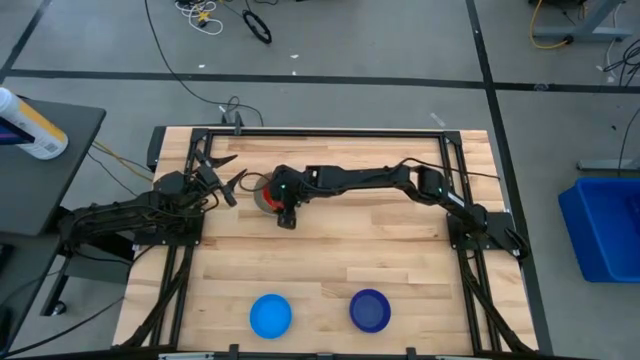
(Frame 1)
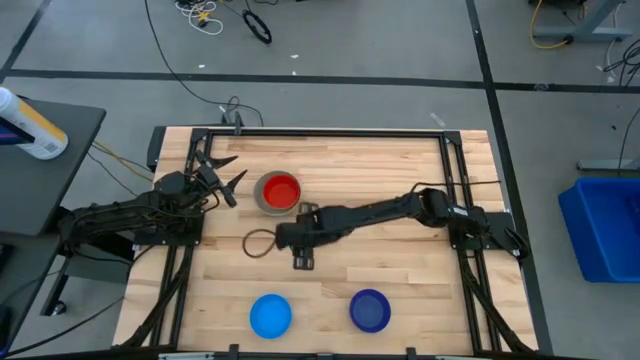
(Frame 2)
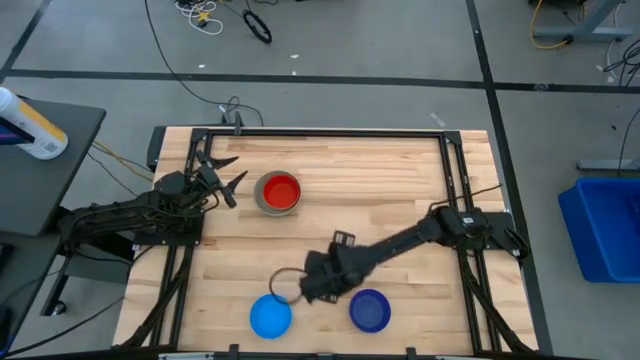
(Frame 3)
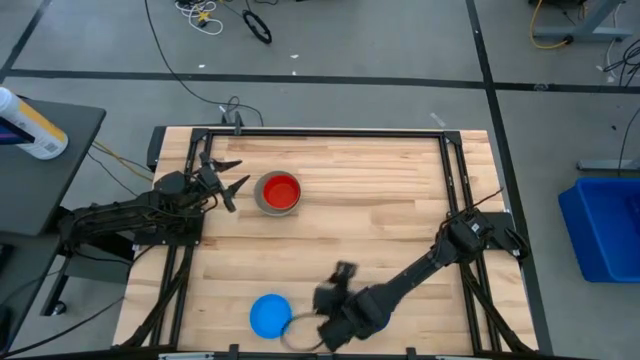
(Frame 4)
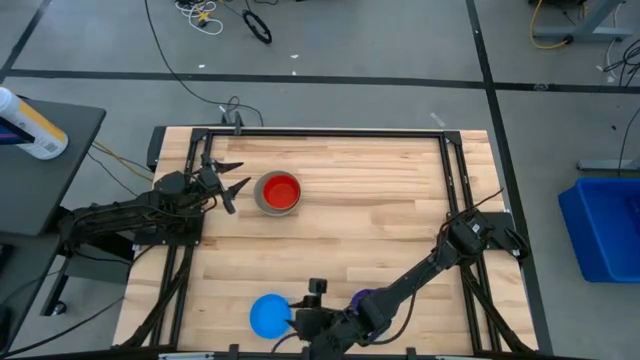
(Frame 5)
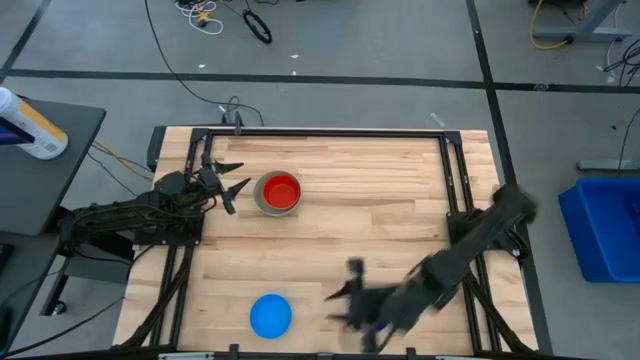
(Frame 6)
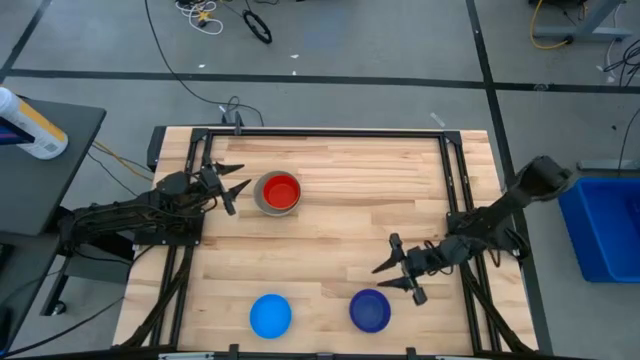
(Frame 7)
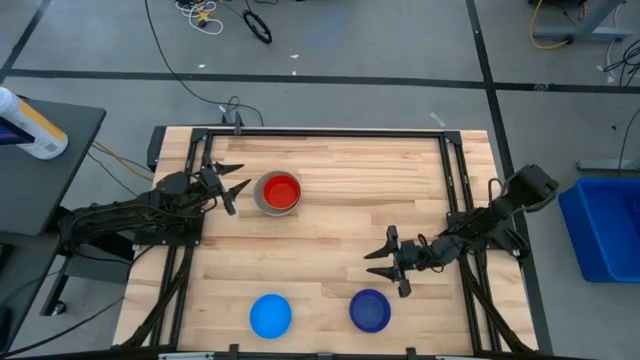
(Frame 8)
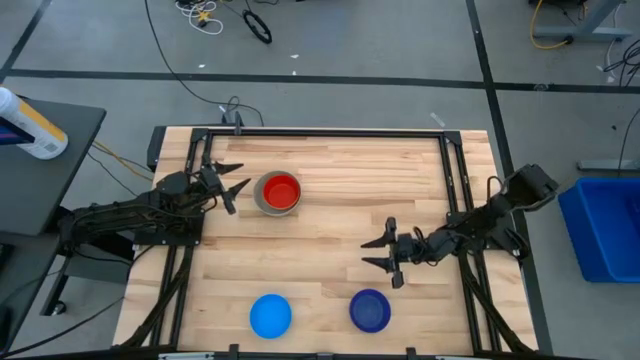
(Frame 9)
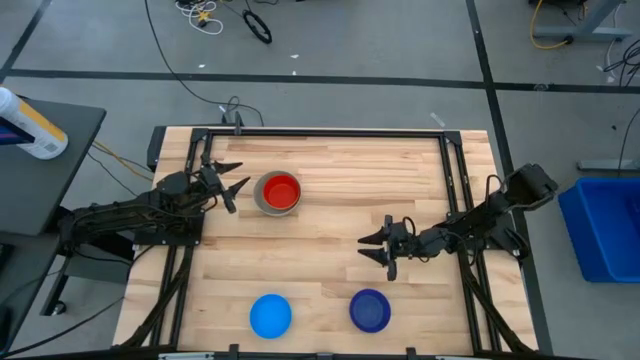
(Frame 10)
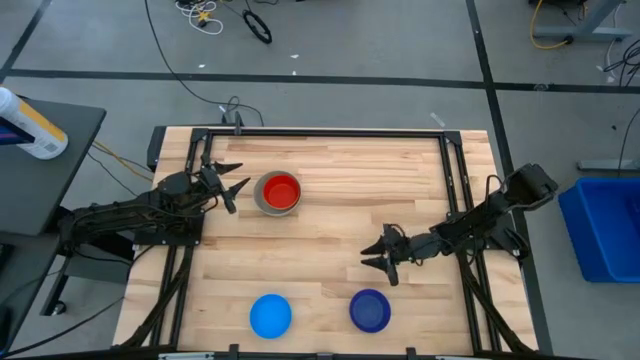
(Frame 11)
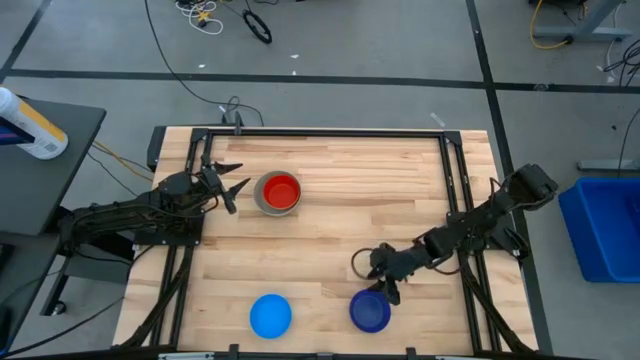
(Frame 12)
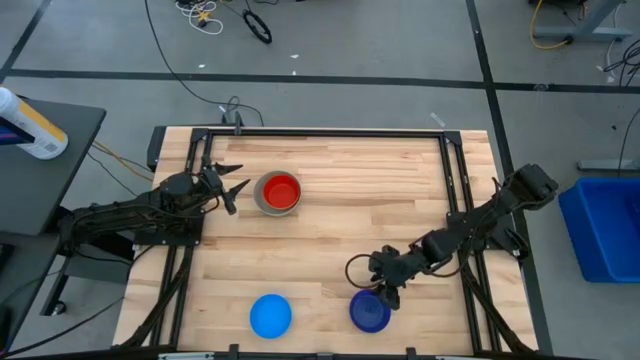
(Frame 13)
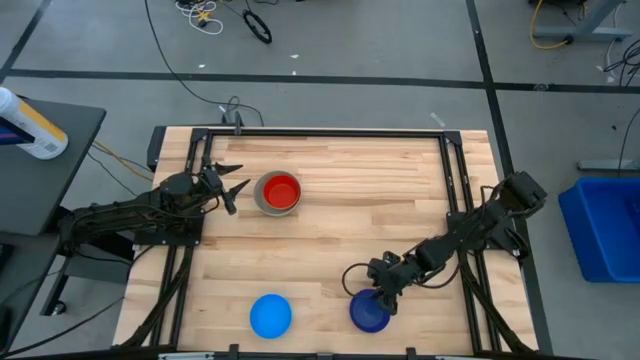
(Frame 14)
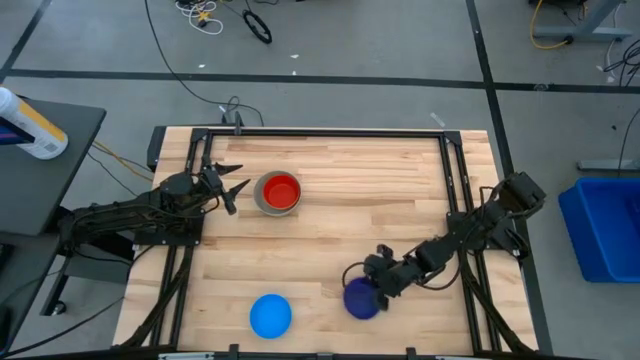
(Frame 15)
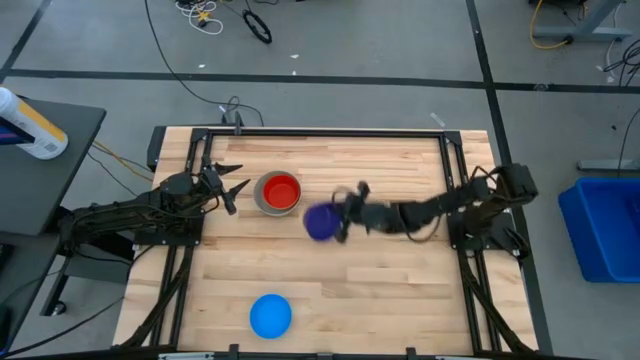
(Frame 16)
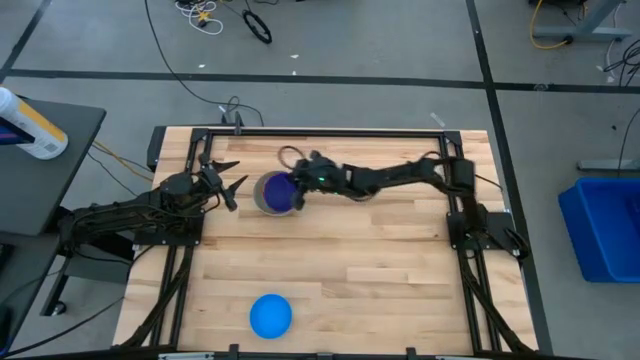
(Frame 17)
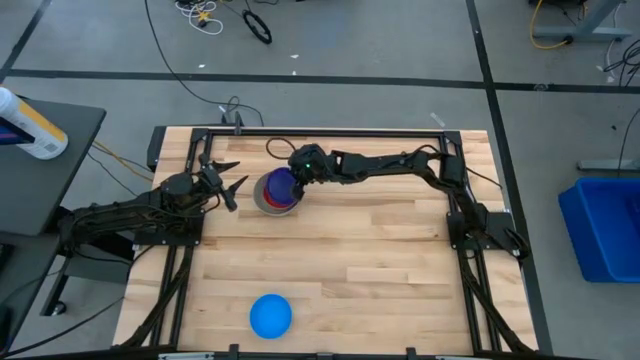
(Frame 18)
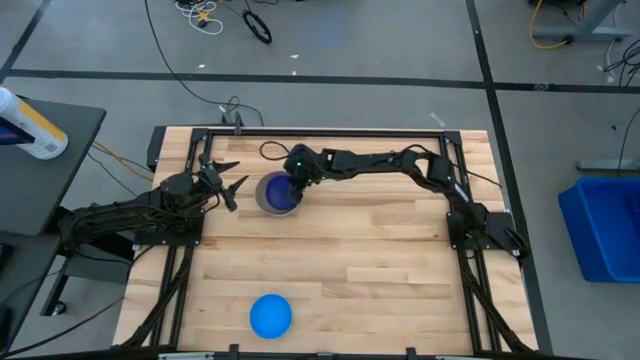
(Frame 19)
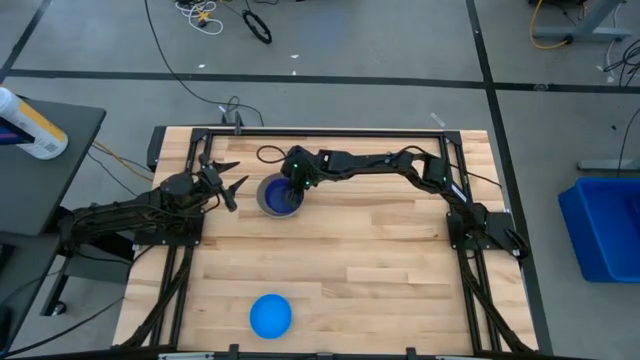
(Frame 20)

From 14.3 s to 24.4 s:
Stack the dark blue bowl on the red bowl

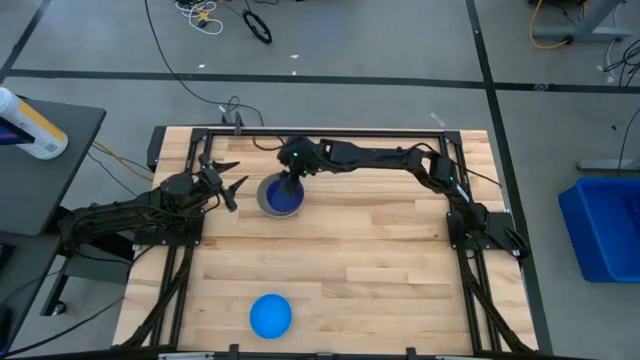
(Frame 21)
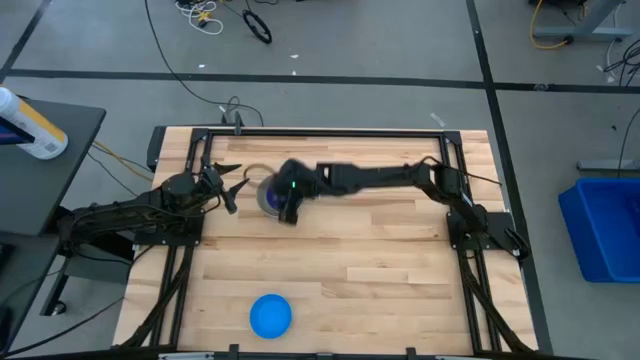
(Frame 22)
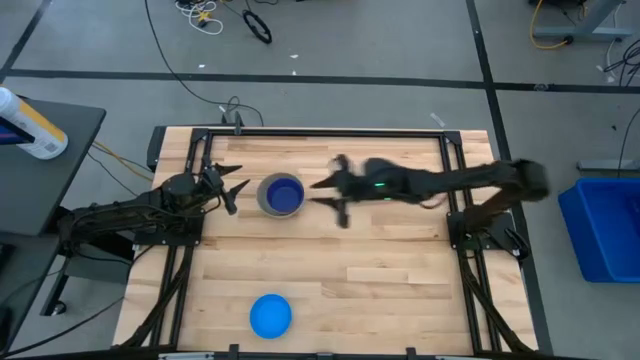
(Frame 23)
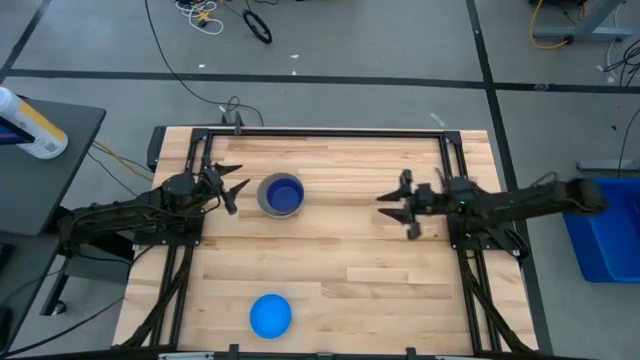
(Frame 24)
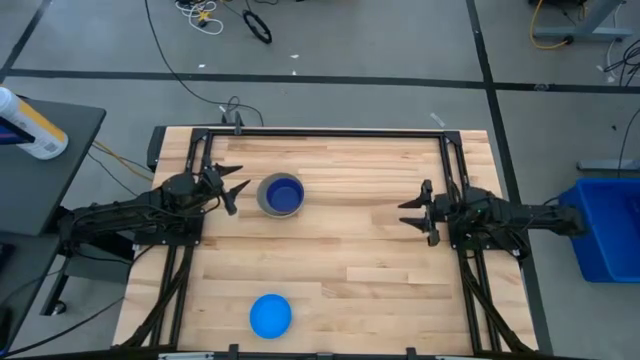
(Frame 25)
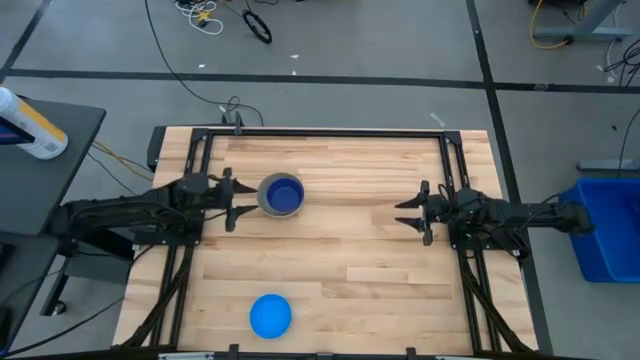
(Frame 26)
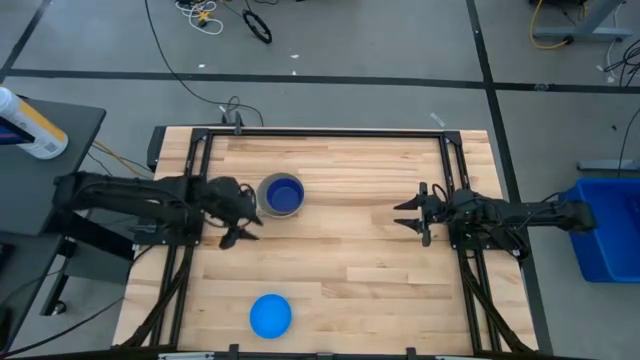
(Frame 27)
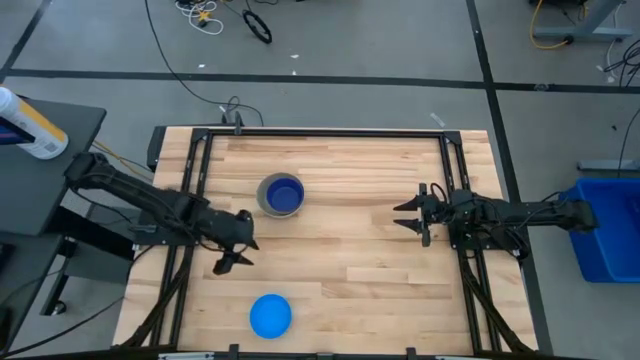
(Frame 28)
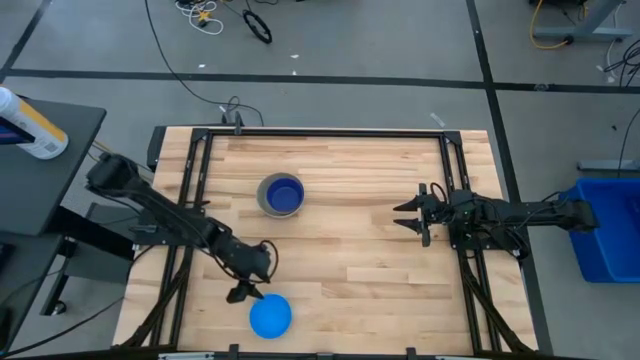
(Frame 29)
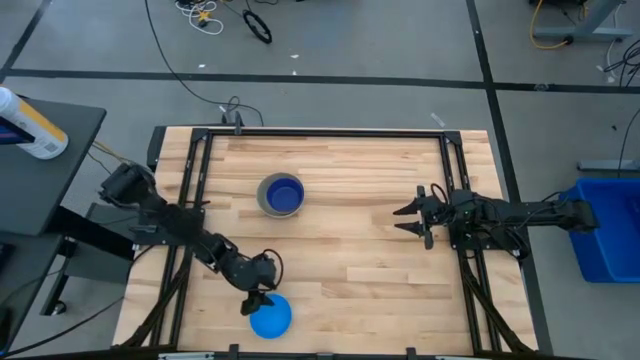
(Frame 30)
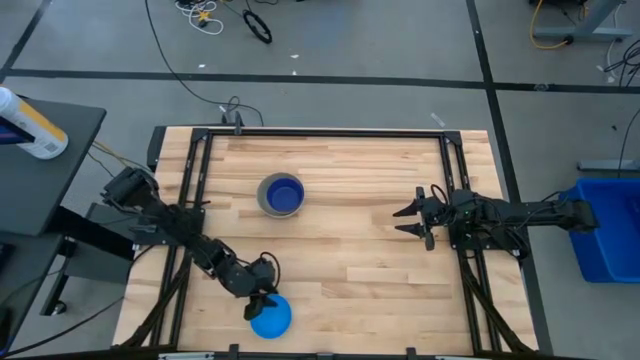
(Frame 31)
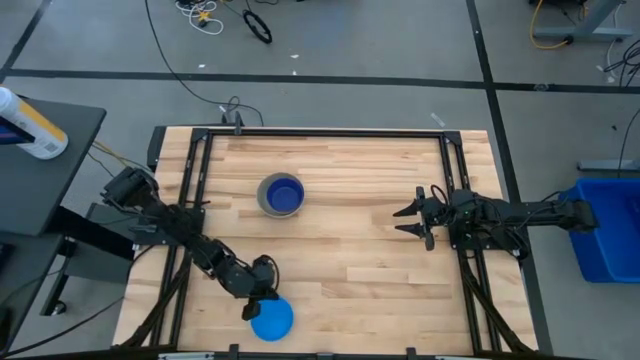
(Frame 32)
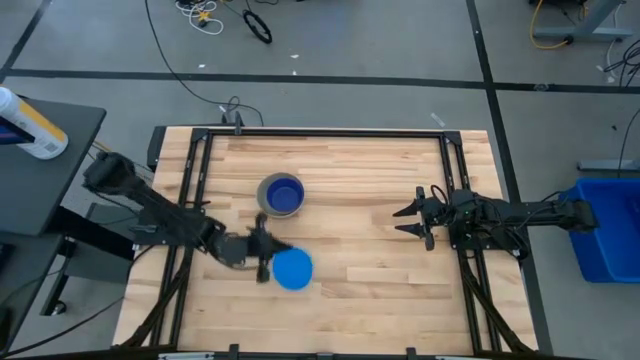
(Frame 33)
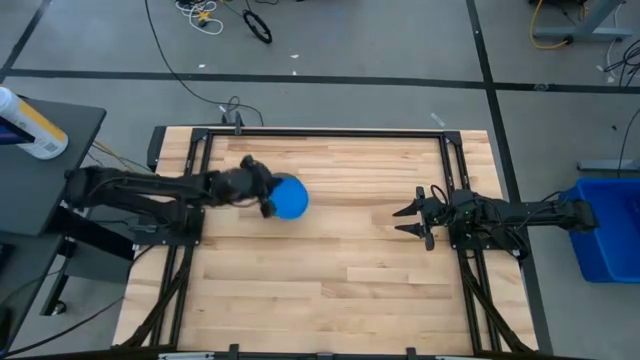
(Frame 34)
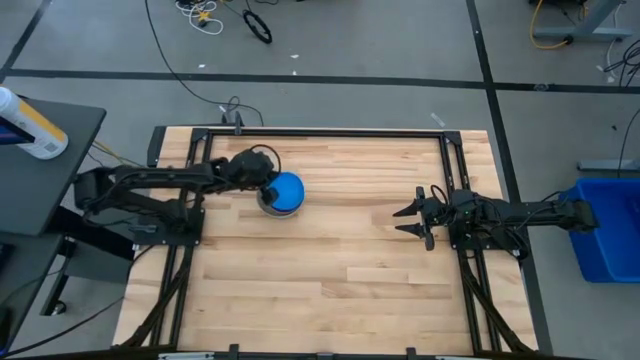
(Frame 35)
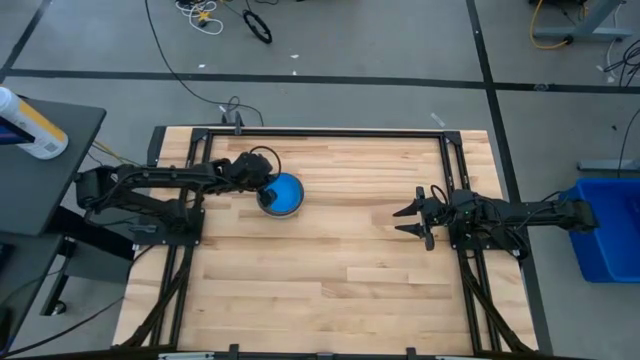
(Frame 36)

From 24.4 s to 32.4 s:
Stack the light blue bowl on the dark blue bowl

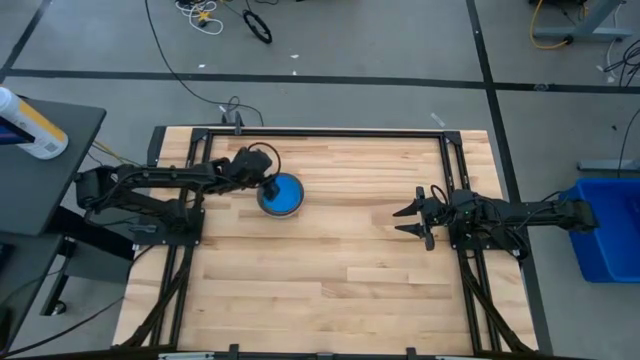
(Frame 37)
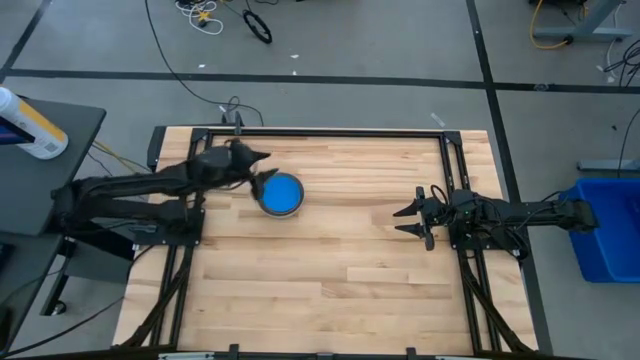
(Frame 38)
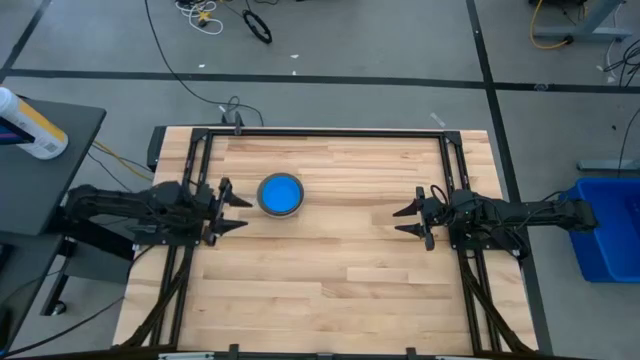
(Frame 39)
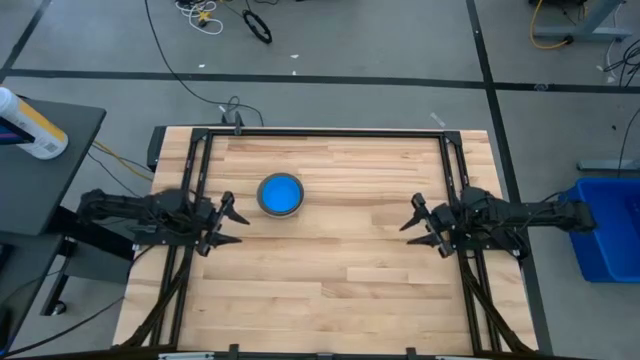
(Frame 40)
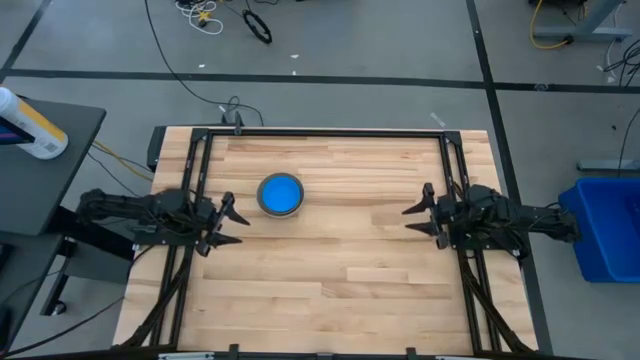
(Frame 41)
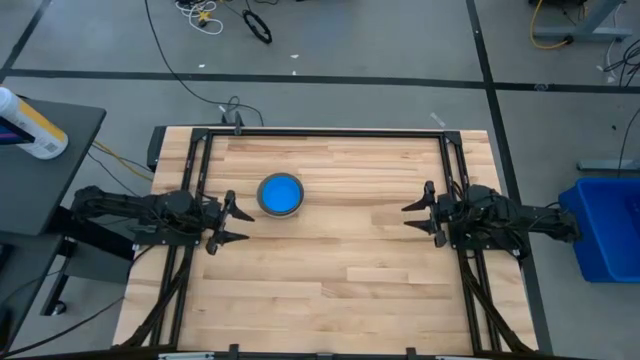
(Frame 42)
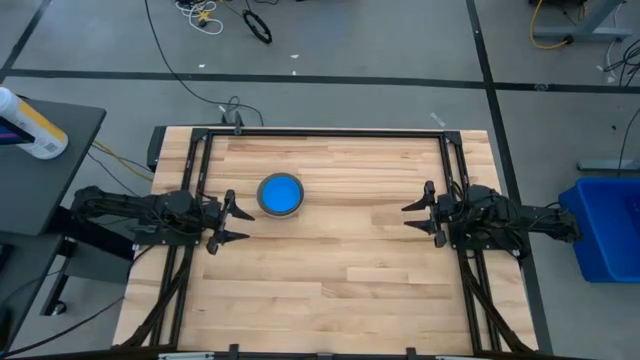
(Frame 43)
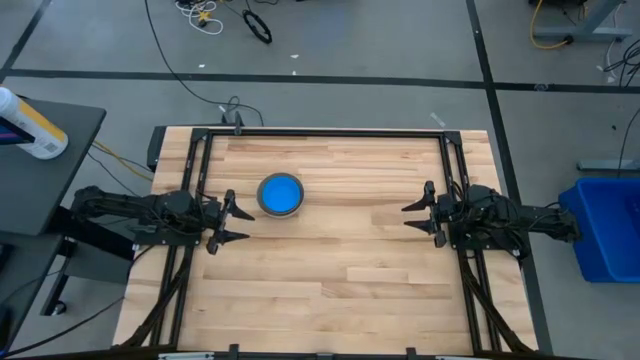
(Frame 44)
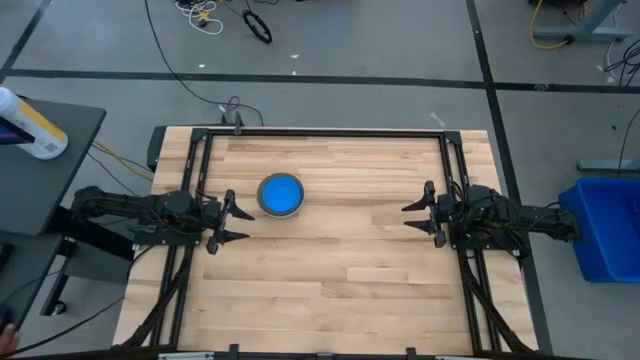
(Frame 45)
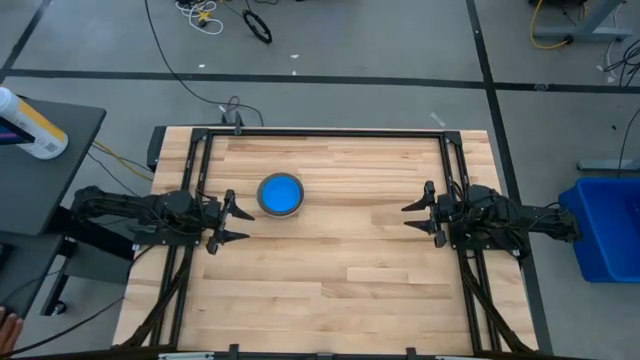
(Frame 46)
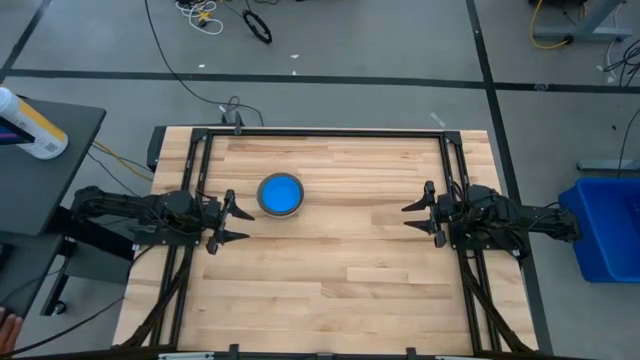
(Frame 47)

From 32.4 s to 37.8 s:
Return to Home Position
